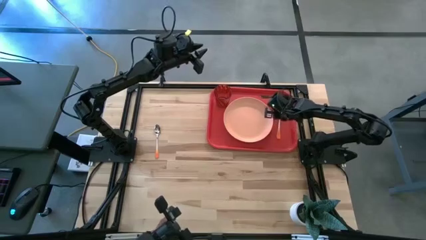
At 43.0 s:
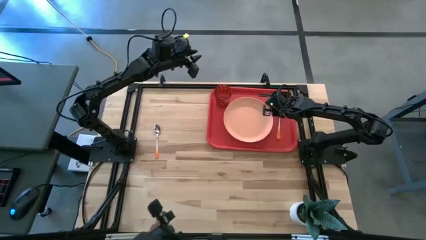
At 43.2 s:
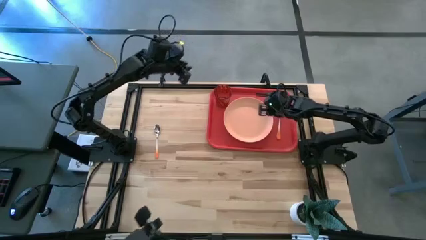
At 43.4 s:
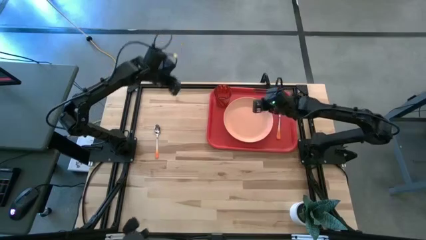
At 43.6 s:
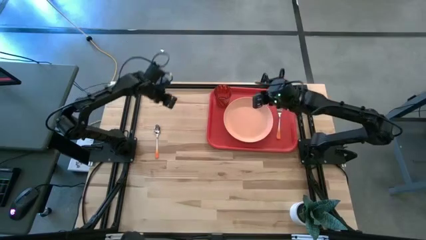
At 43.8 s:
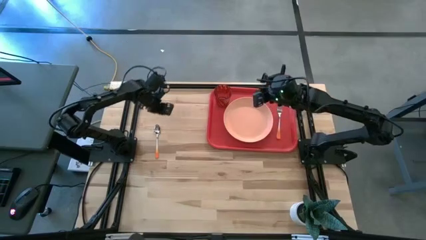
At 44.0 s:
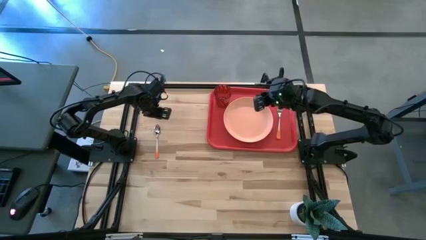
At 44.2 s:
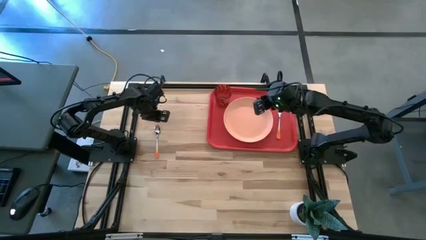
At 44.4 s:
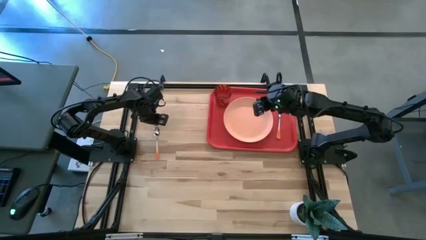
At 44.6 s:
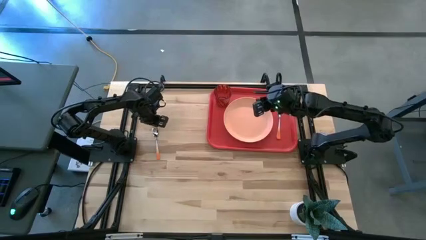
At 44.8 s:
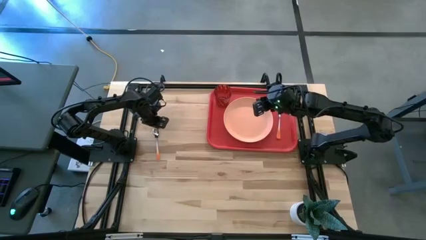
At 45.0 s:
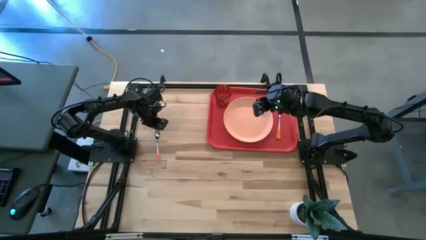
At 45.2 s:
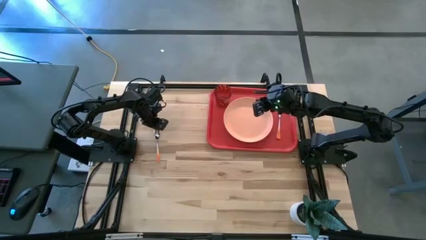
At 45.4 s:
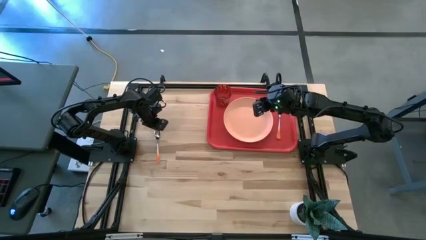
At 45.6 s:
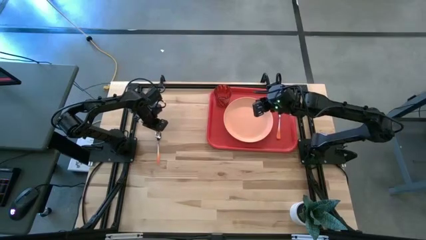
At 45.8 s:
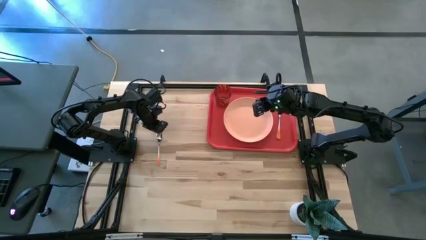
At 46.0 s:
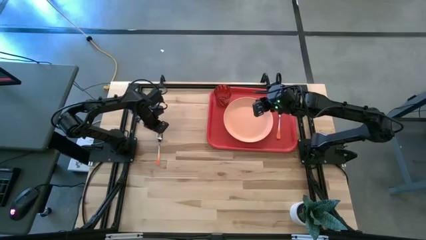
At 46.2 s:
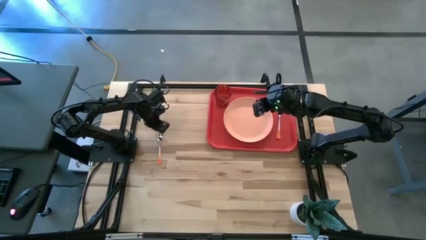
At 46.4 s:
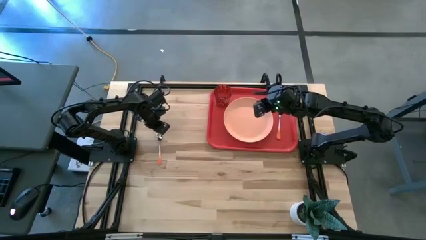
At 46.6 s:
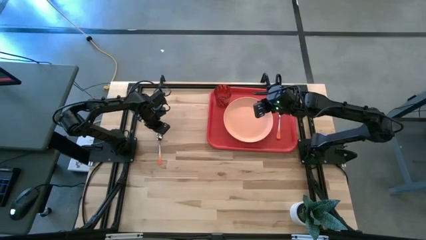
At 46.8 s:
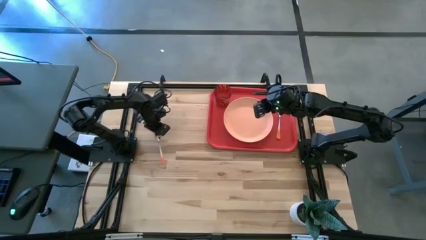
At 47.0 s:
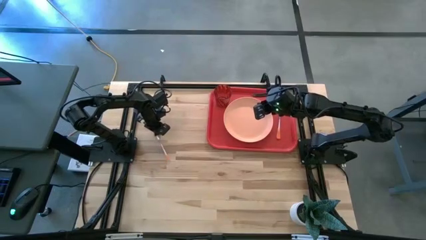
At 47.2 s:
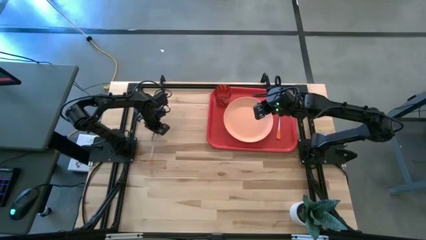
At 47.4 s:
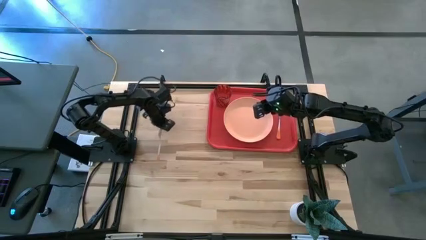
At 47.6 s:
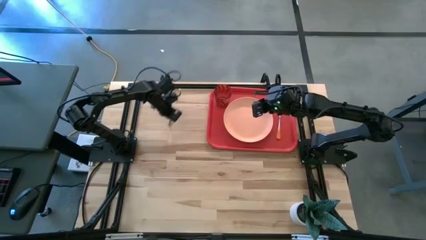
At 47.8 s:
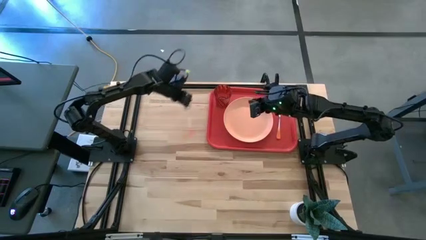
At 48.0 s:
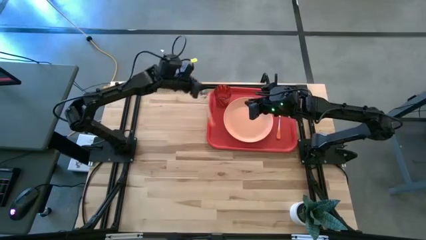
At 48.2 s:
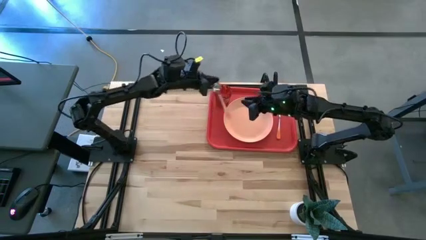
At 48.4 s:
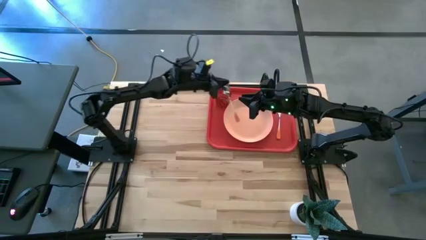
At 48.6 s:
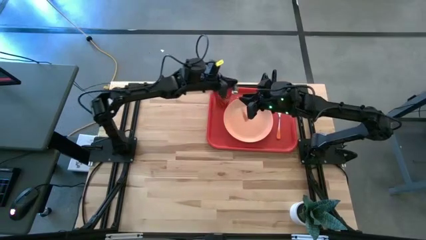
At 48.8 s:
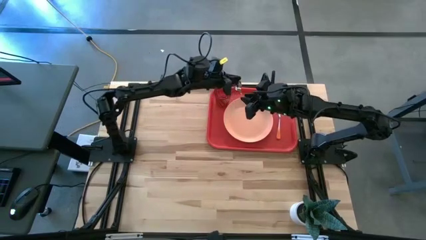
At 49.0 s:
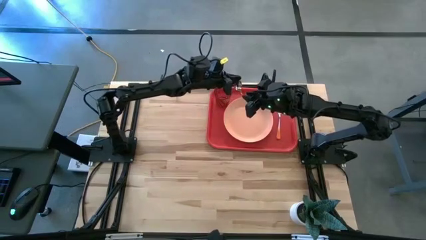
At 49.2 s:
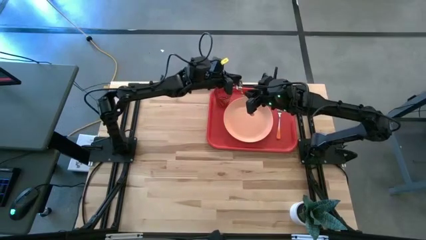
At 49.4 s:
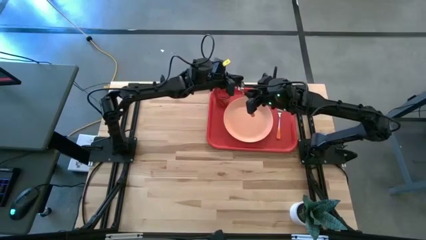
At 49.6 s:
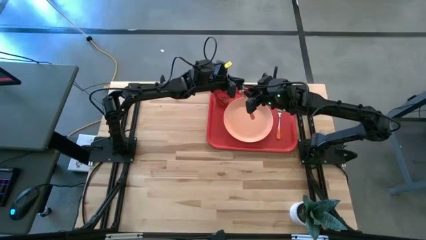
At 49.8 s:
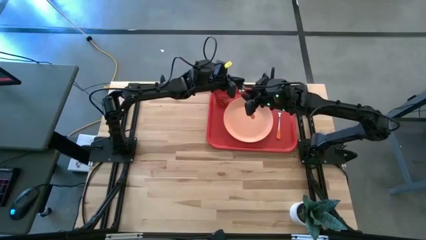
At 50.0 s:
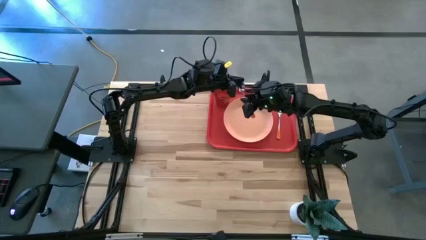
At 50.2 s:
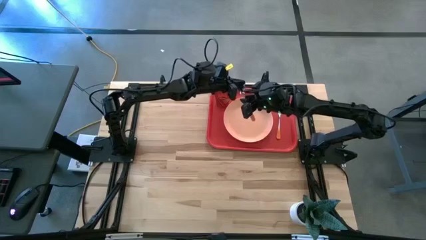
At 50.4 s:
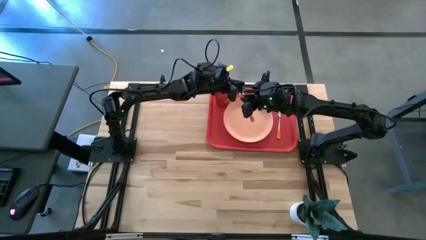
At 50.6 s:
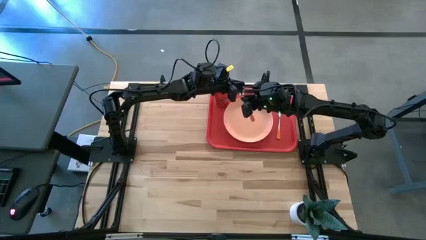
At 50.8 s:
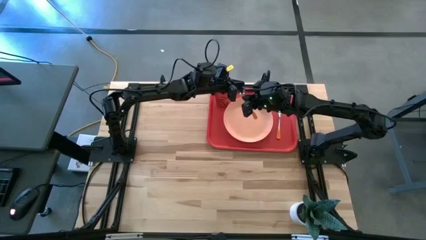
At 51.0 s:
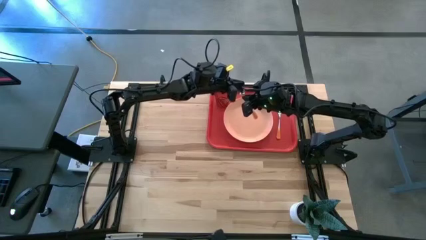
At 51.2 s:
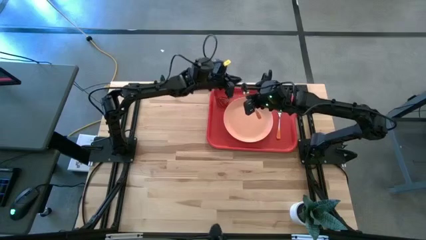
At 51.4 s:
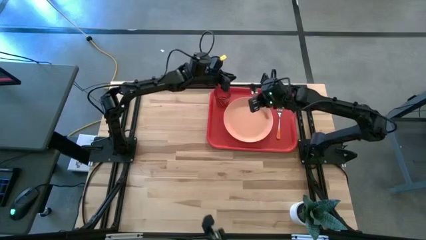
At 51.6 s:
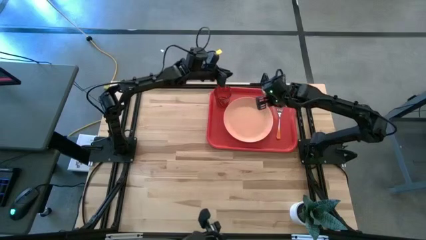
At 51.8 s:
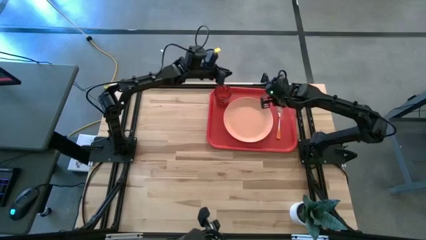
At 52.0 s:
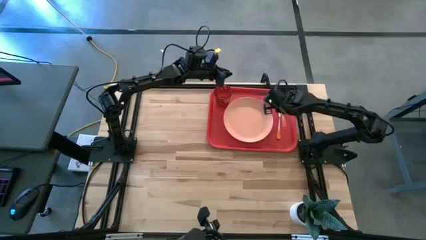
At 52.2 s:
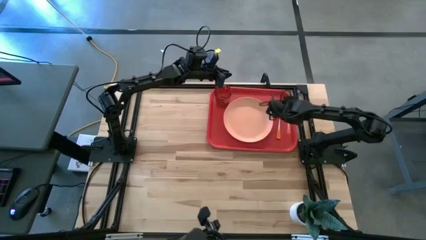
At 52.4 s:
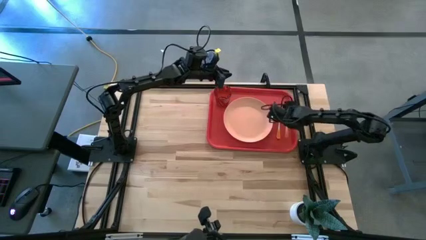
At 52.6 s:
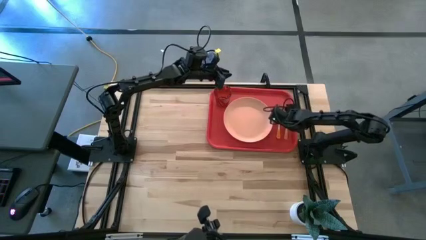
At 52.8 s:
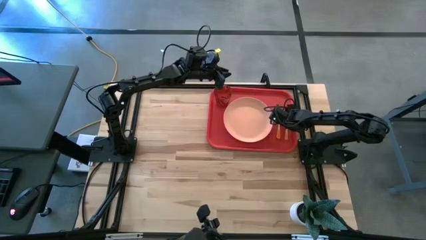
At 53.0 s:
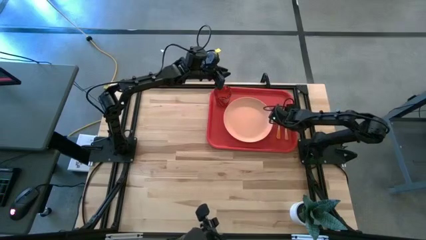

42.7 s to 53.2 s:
Task: Pick and place plate/cup/fork/spoon on tray
Put the spoon on the red tray to the right of the fork
